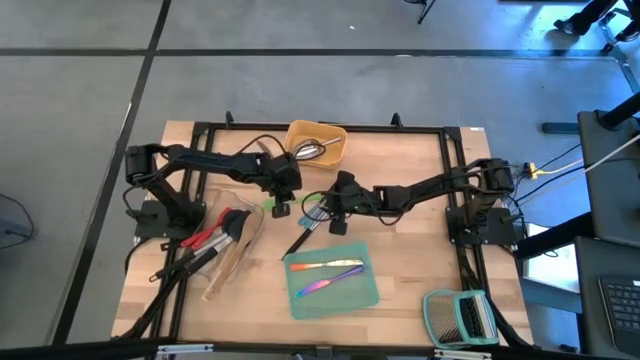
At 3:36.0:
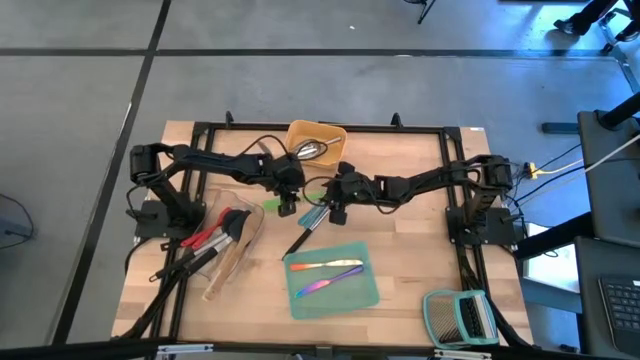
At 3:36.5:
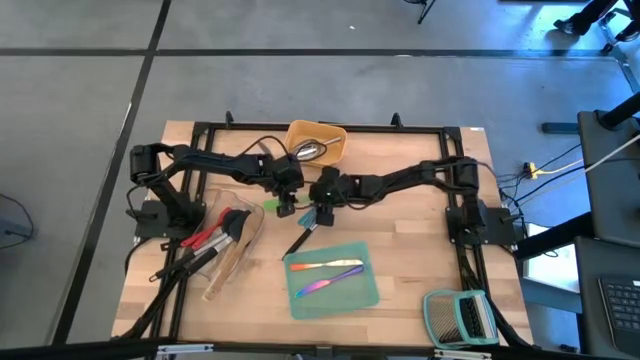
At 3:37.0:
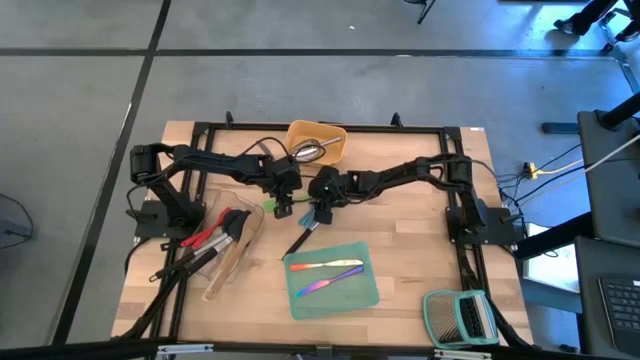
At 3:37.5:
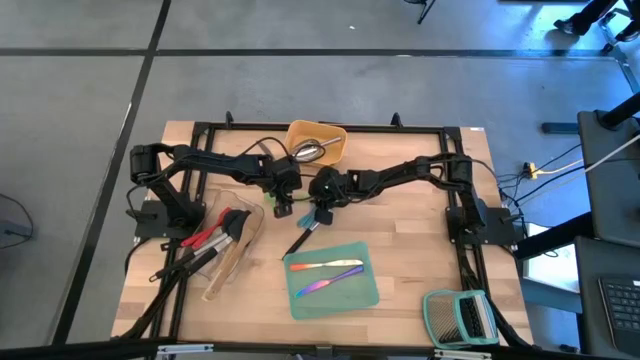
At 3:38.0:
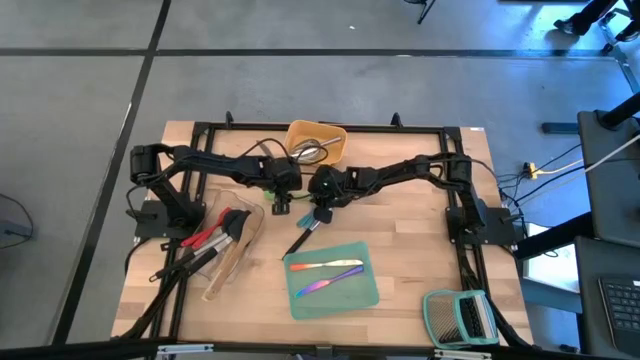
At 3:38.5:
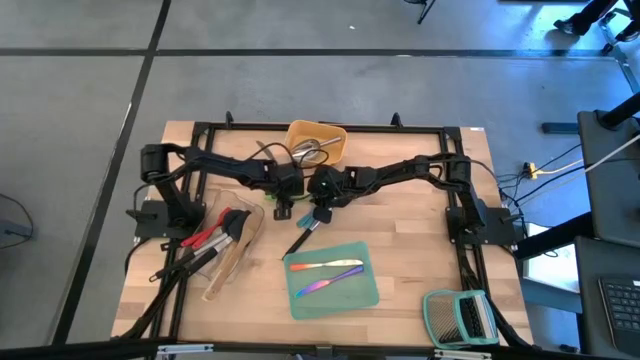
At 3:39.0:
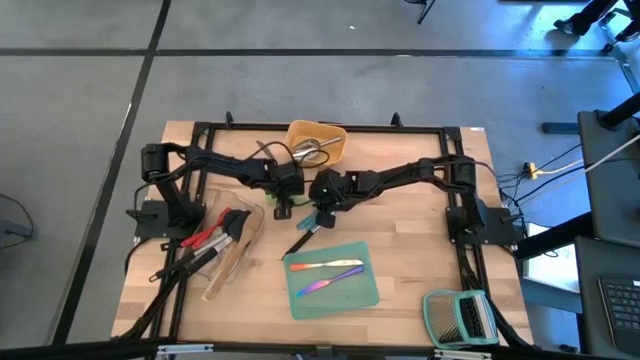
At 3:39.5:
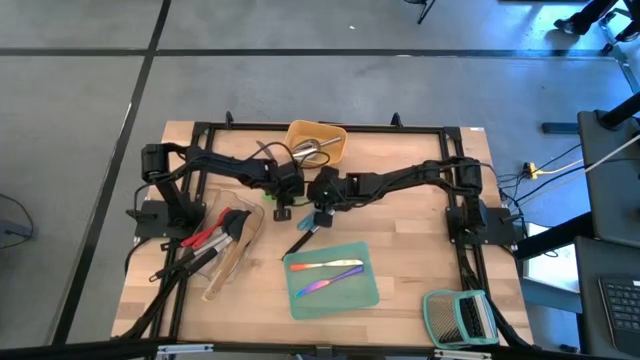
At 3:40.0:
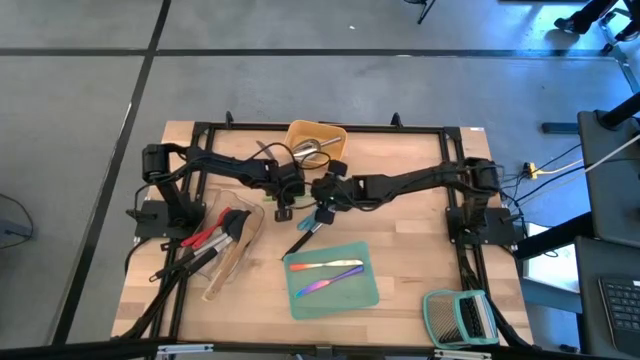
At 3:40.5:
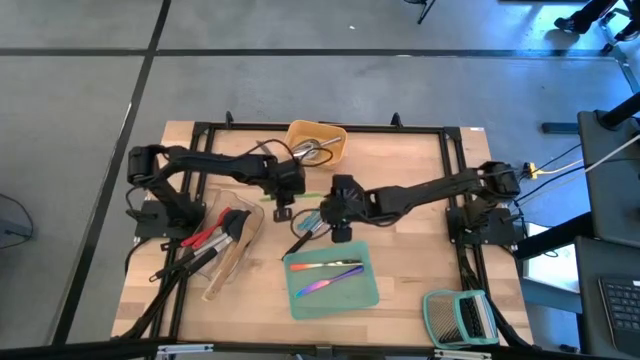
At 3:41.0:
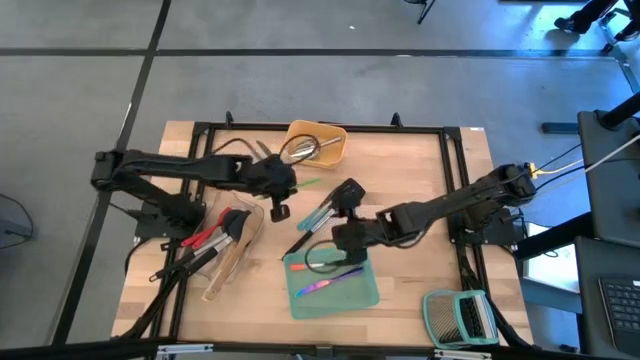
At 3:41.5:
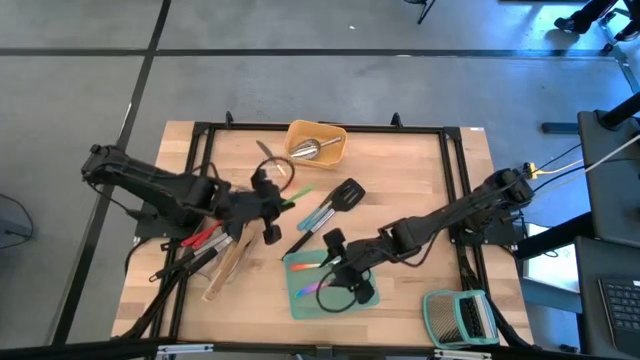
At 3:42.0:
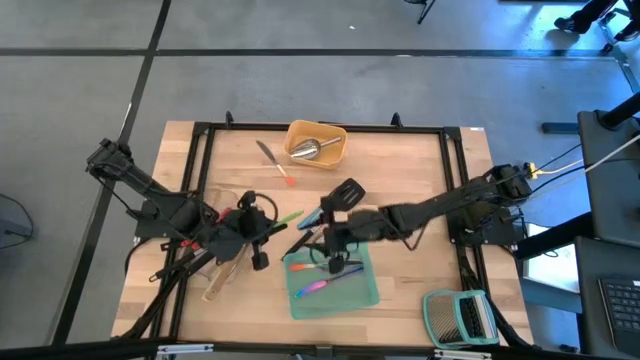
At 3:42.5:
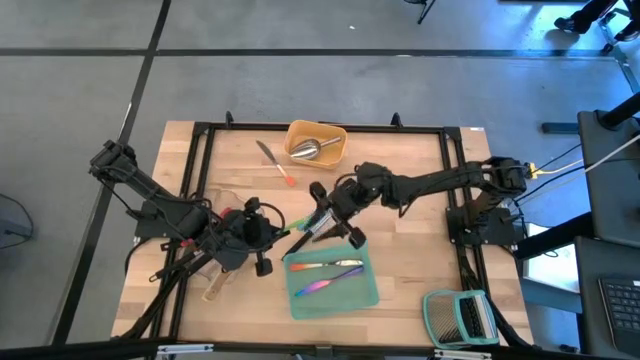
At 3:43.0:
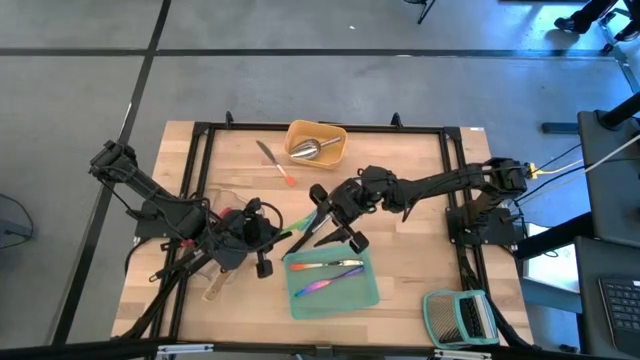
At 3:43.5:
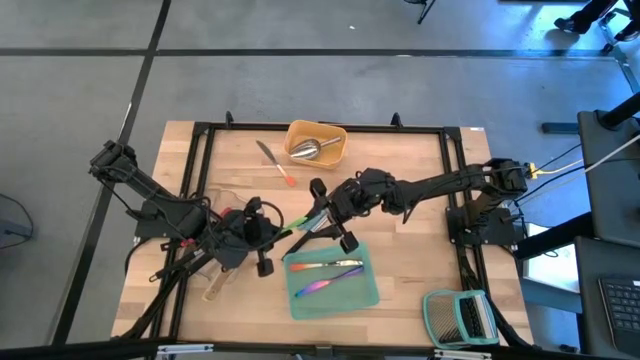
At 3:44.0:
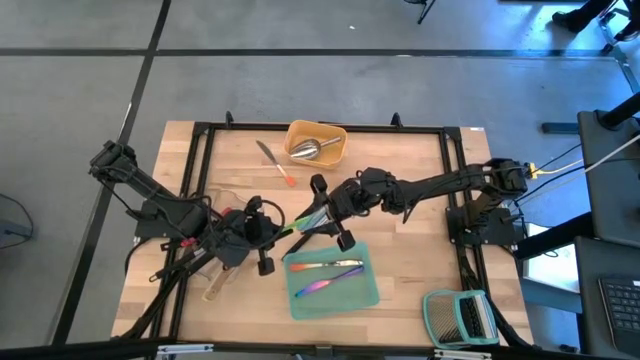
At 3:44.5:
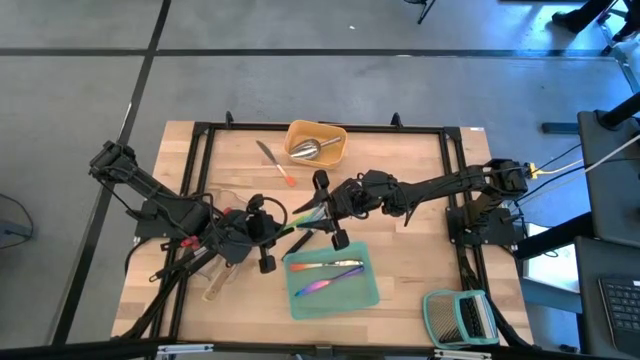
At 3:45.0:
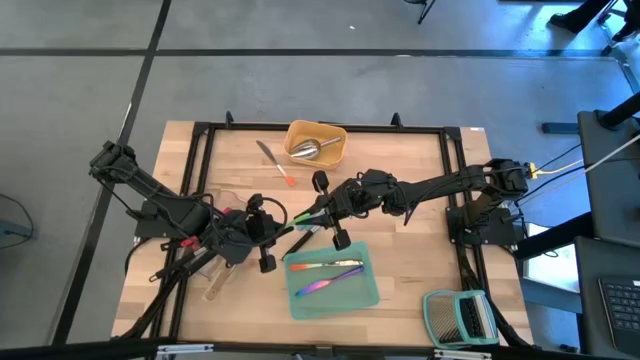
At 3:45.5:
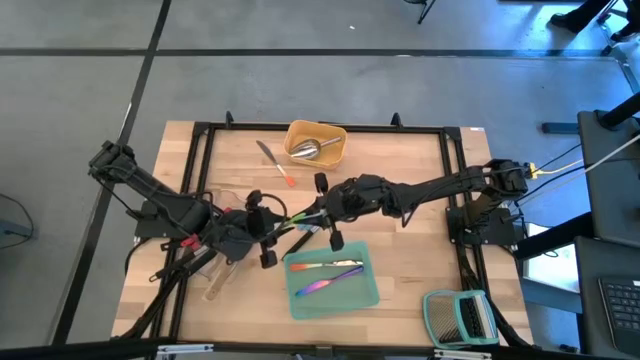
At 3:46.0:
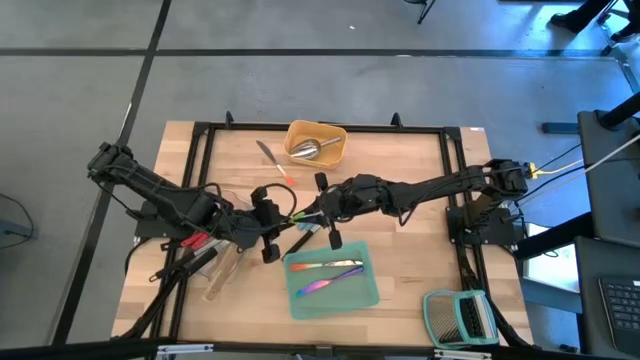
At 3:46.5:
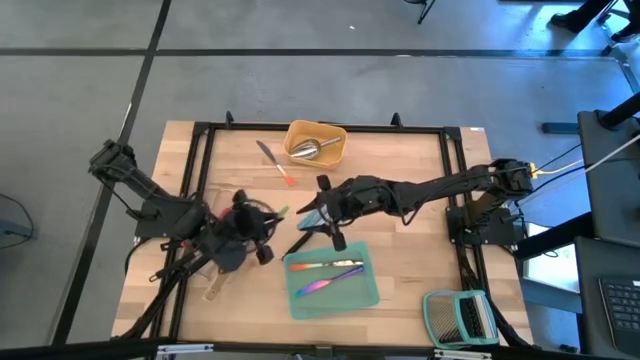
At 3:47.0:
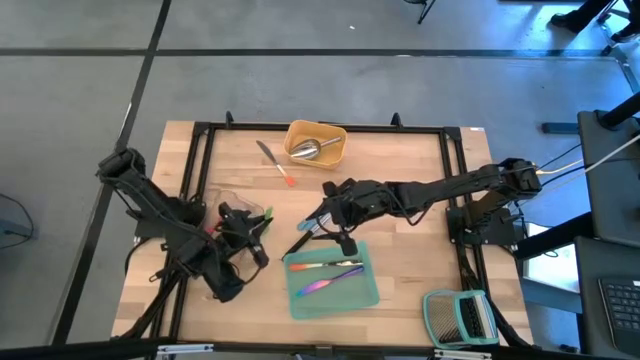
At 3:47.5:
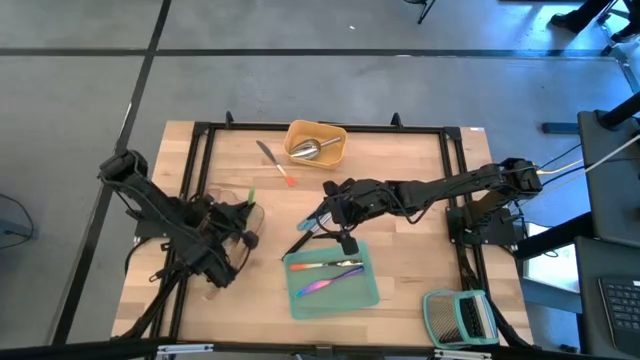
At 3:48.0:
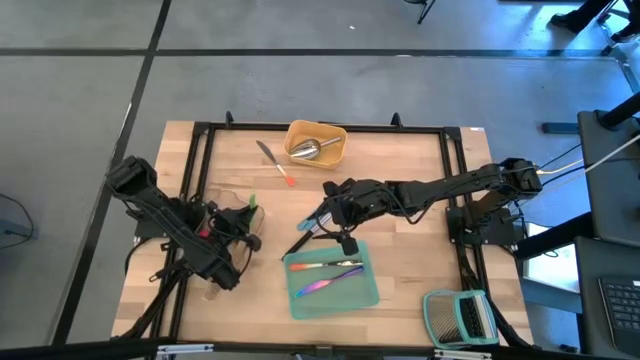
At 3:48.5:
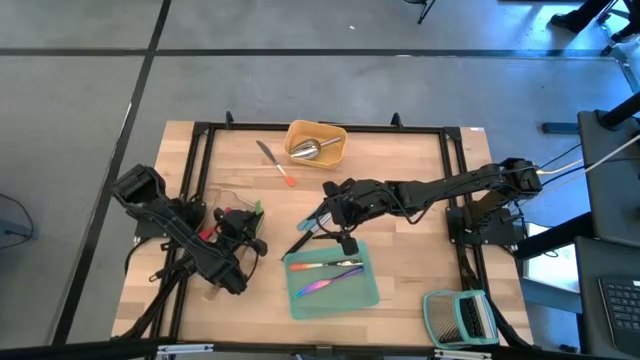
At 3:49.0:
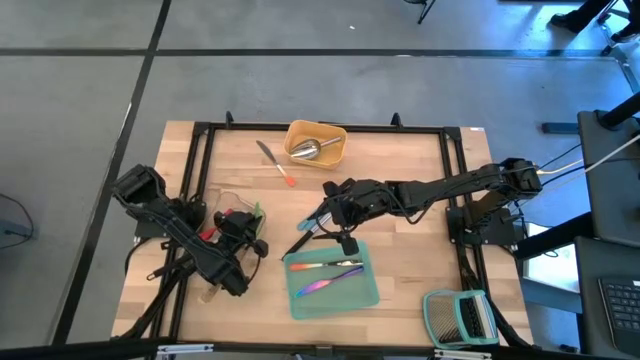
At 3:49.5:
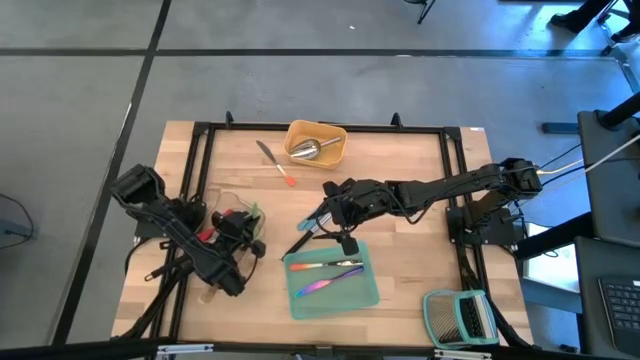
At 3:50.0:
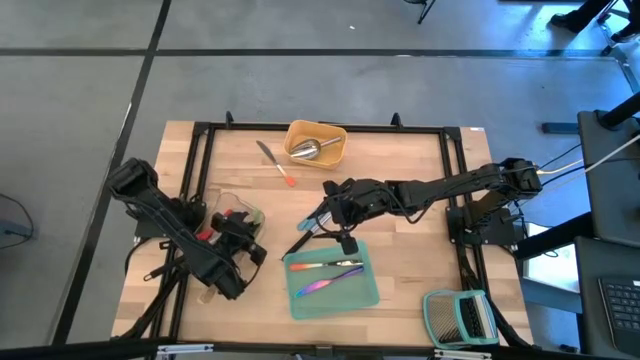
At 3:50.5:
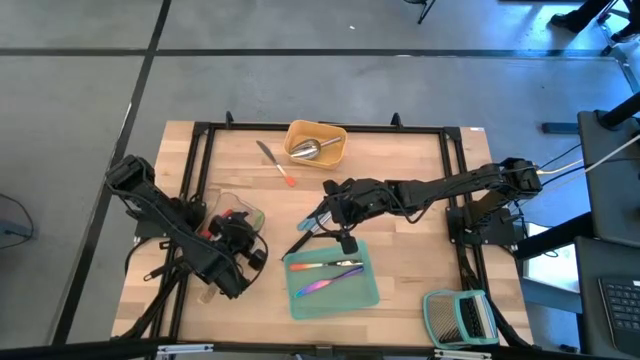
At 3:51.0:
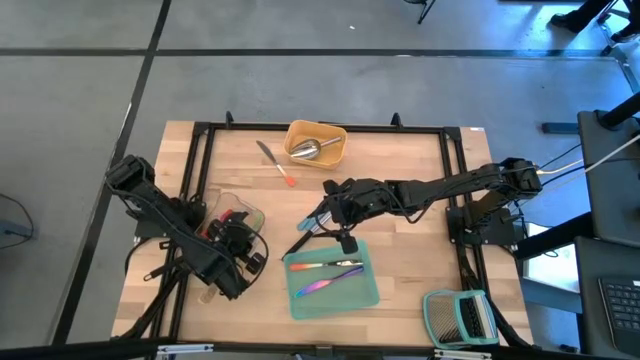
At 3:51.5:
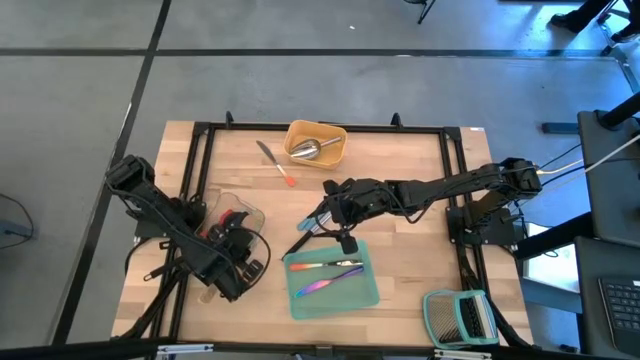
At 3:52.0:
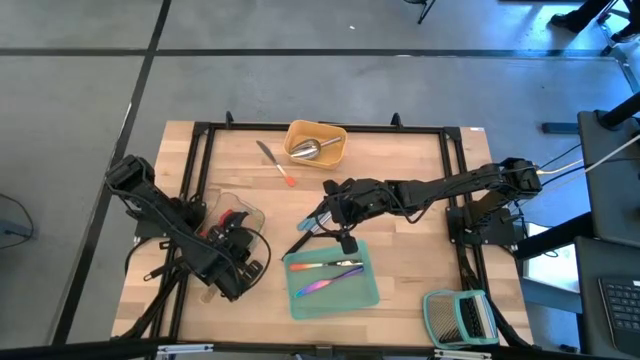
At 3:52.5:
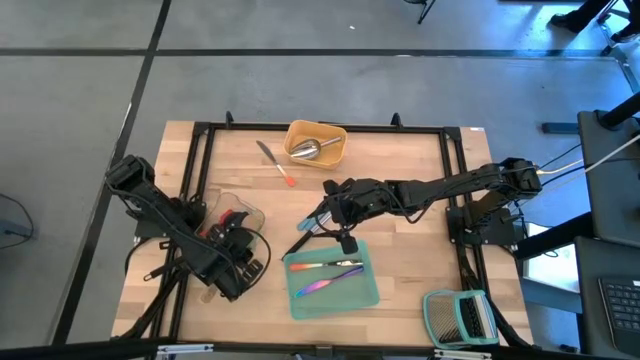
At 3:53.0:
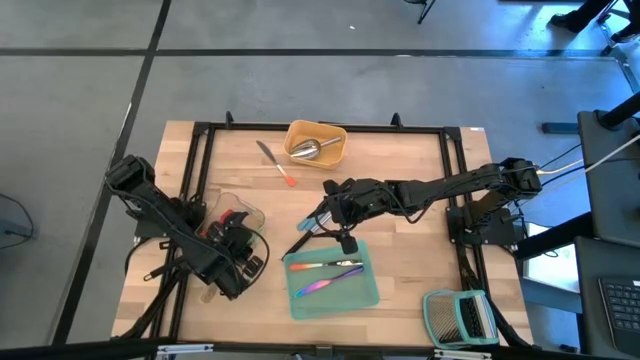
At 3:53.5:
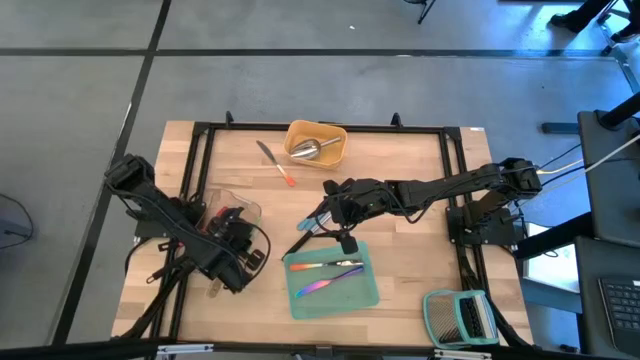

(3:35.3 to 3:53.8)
Task: Pick & Place Kitchen Items
Put the green spatula into the transparent bin

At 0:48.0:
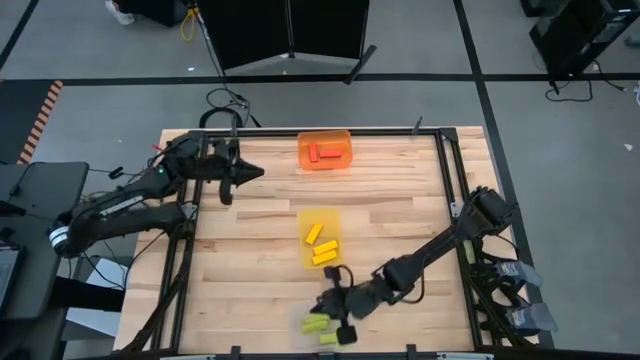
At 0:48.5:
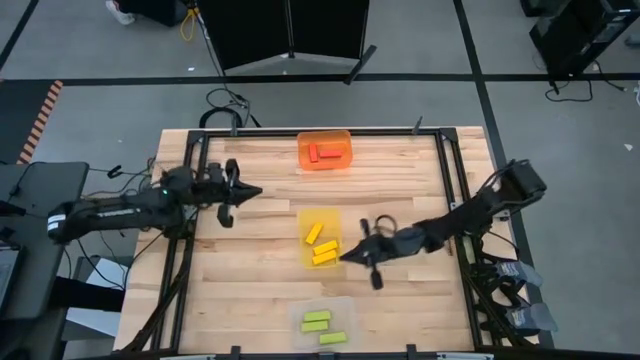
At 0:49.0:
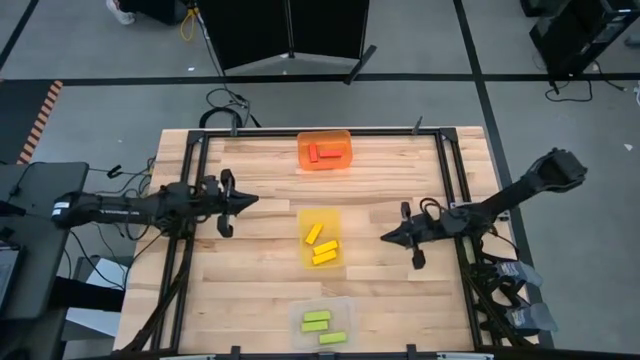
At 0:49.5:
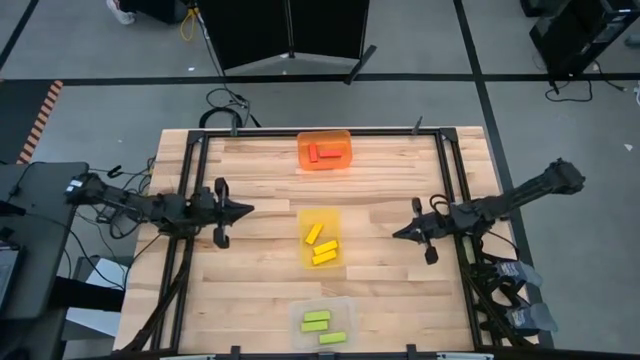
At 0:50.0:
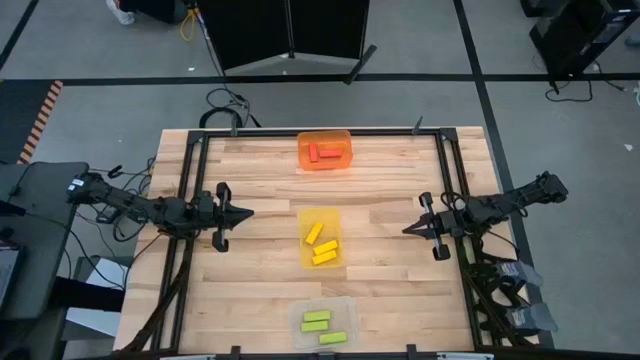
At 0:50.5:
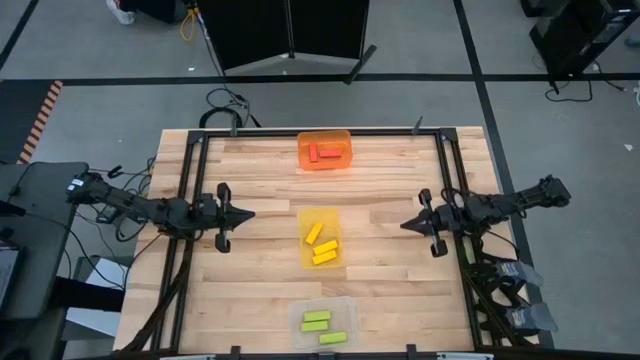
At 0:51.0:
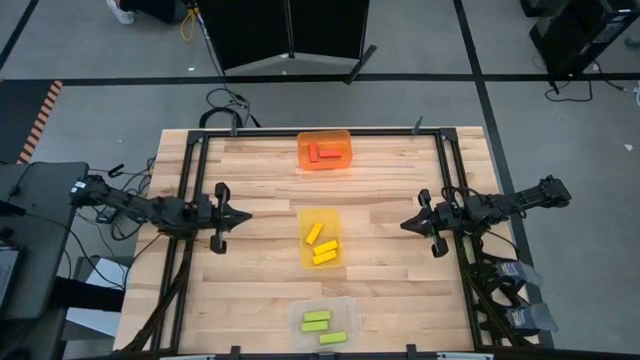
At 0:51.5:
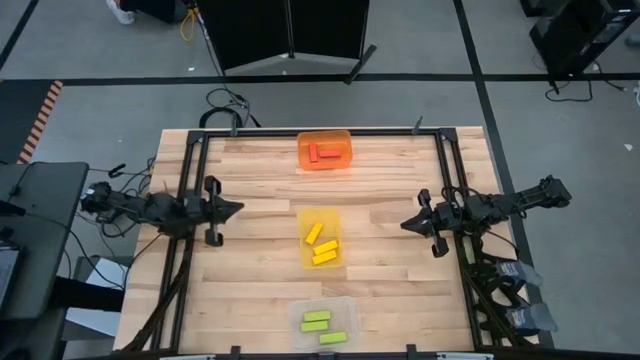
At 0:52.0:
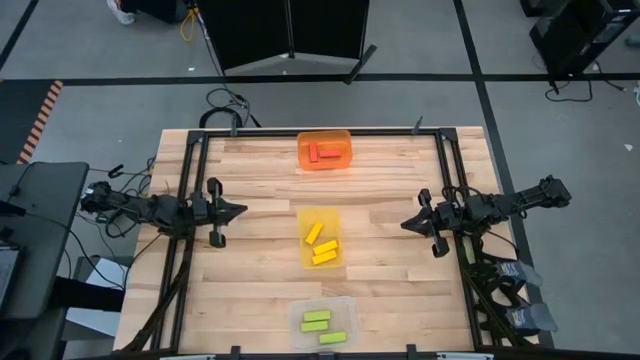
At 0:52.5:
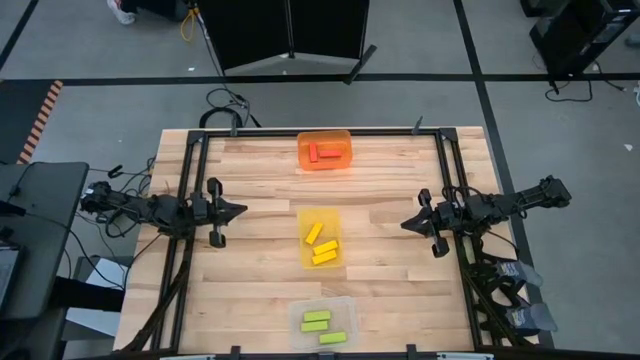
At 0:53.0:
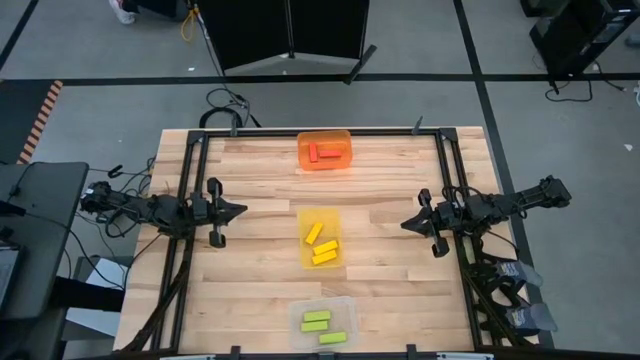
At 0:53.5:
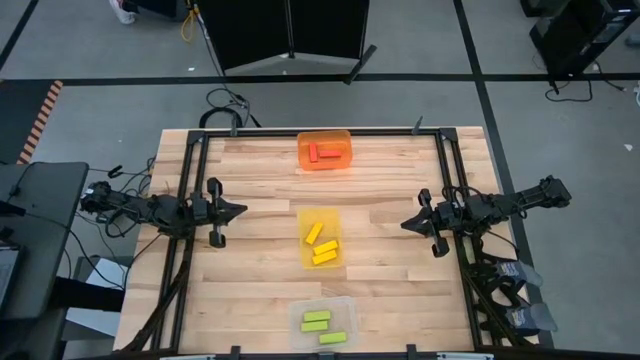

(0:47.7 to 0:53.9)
Task: Sort blocks
Return to Home Position
